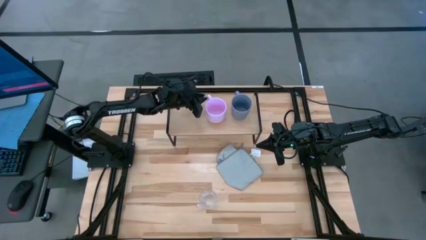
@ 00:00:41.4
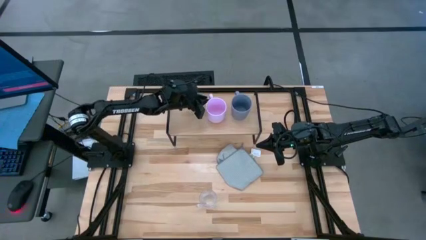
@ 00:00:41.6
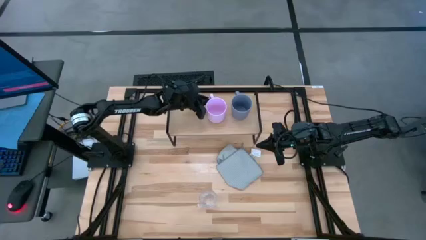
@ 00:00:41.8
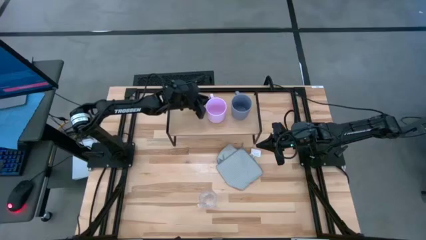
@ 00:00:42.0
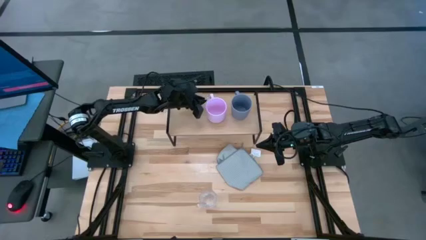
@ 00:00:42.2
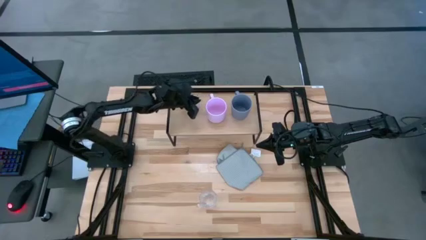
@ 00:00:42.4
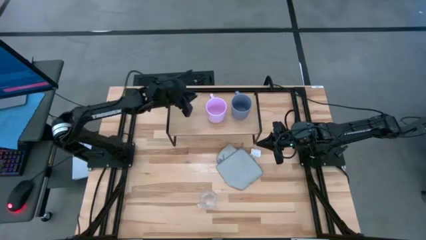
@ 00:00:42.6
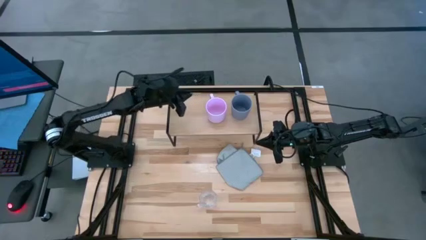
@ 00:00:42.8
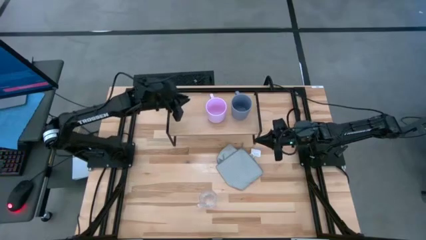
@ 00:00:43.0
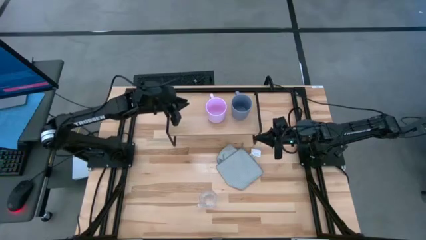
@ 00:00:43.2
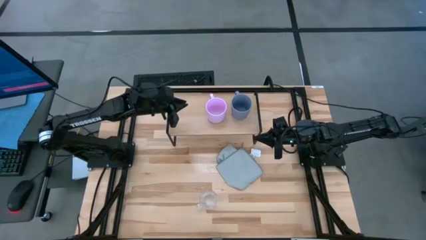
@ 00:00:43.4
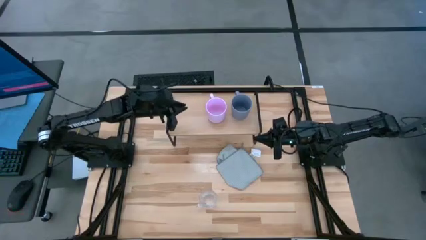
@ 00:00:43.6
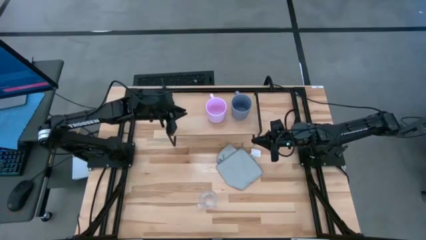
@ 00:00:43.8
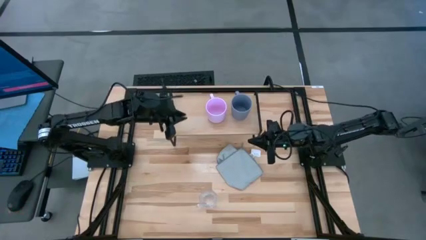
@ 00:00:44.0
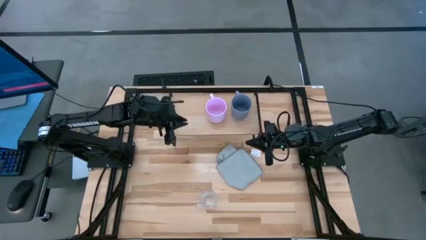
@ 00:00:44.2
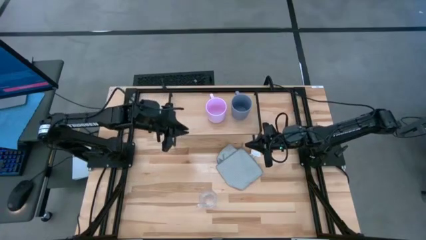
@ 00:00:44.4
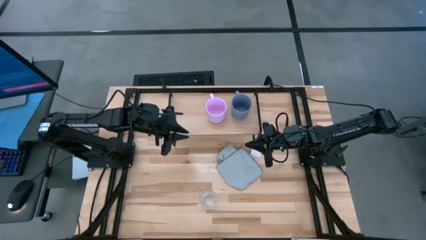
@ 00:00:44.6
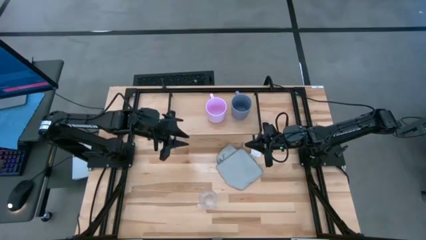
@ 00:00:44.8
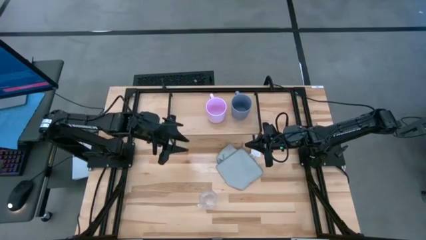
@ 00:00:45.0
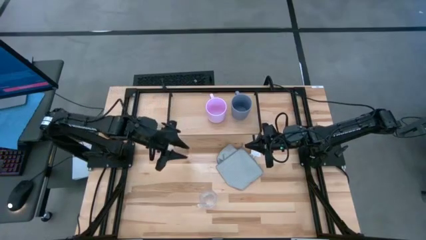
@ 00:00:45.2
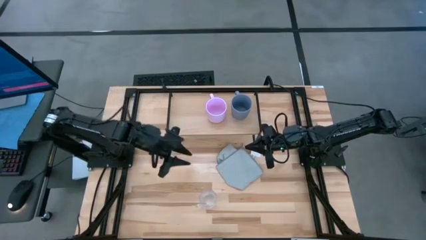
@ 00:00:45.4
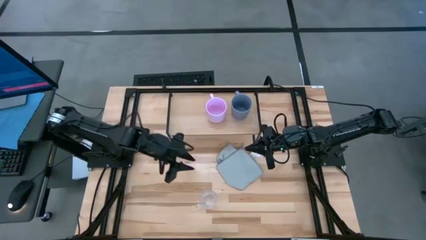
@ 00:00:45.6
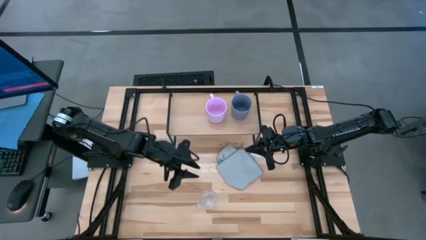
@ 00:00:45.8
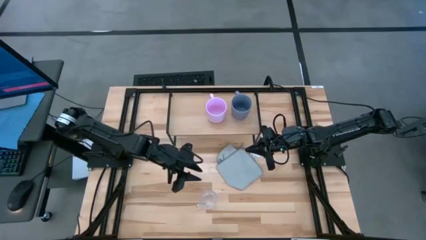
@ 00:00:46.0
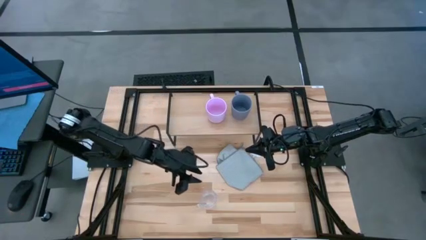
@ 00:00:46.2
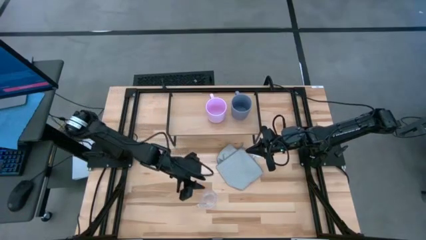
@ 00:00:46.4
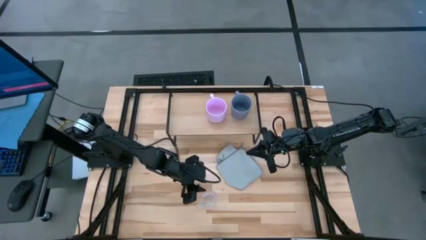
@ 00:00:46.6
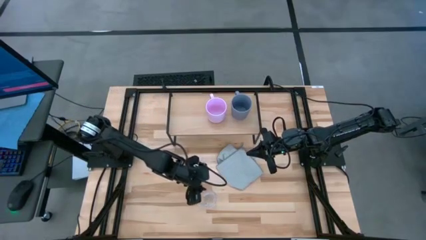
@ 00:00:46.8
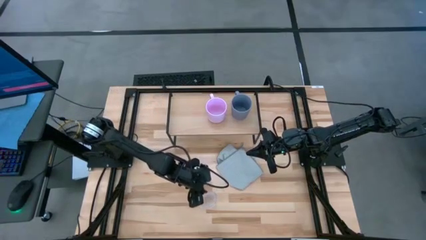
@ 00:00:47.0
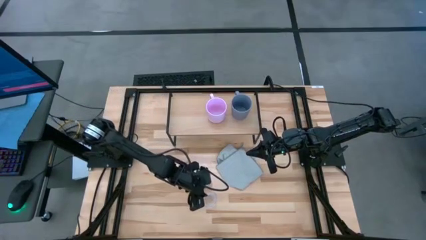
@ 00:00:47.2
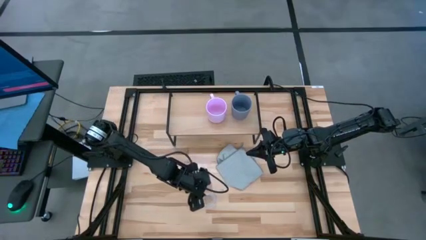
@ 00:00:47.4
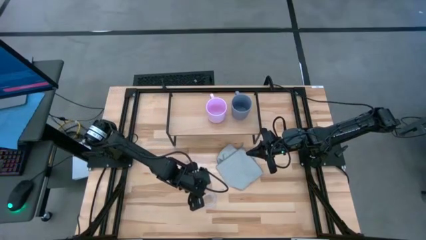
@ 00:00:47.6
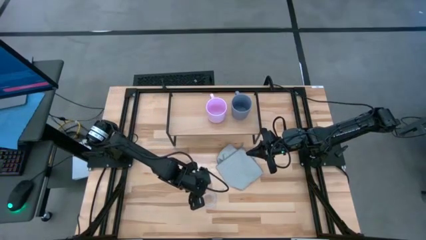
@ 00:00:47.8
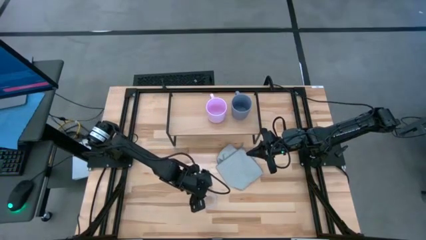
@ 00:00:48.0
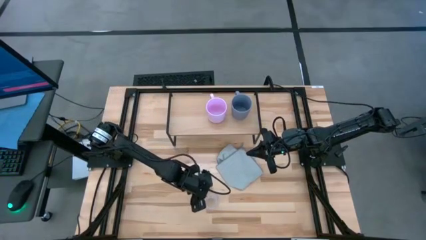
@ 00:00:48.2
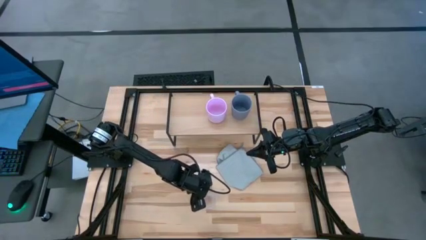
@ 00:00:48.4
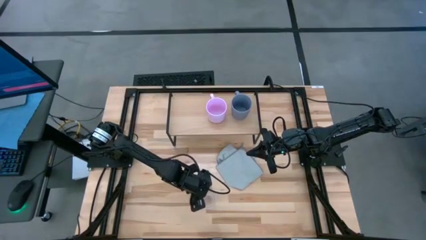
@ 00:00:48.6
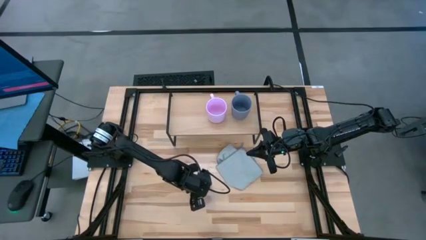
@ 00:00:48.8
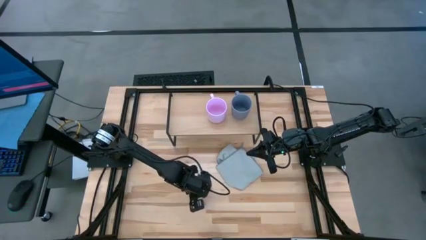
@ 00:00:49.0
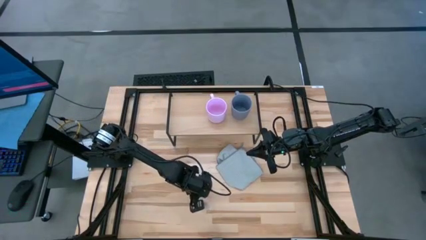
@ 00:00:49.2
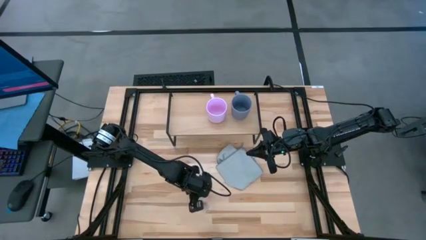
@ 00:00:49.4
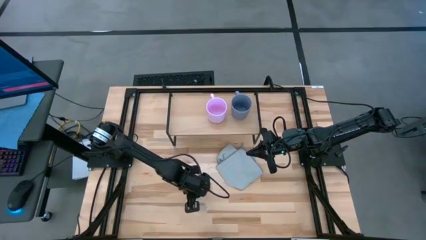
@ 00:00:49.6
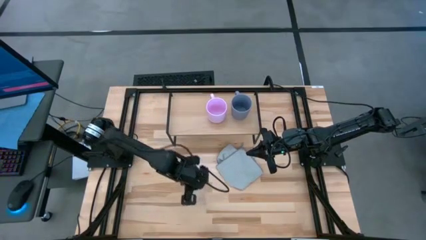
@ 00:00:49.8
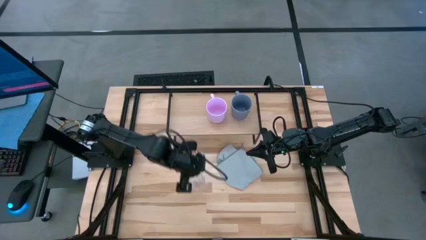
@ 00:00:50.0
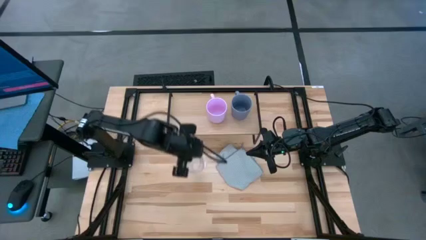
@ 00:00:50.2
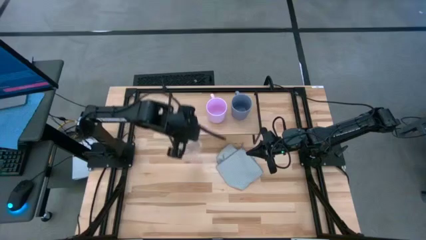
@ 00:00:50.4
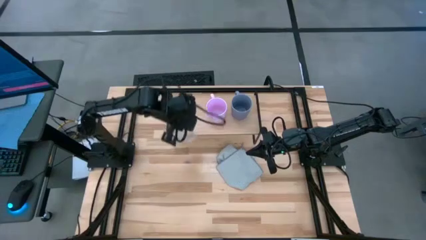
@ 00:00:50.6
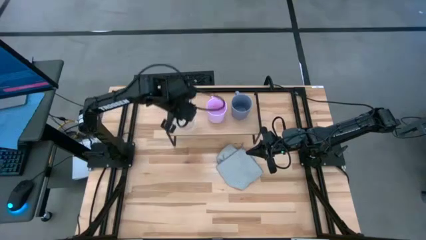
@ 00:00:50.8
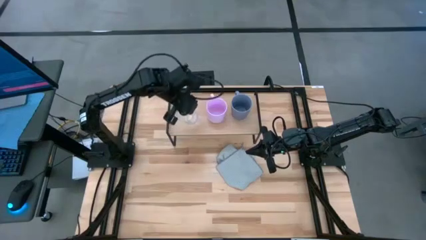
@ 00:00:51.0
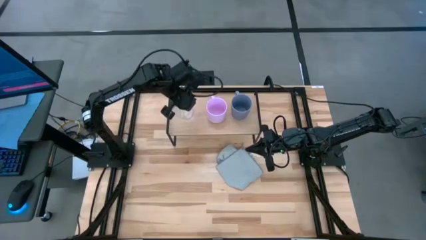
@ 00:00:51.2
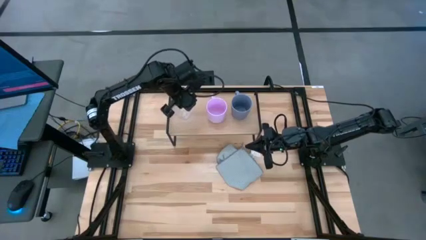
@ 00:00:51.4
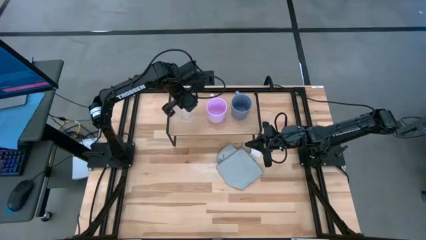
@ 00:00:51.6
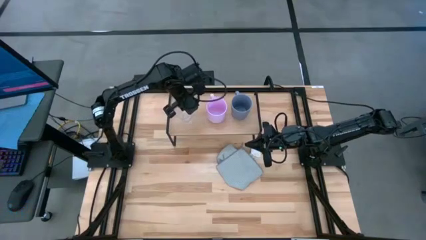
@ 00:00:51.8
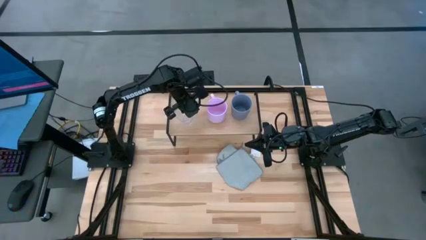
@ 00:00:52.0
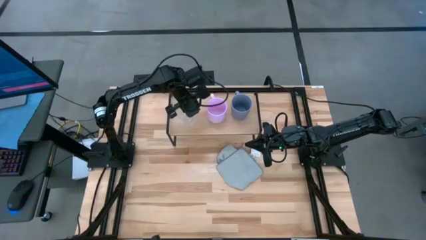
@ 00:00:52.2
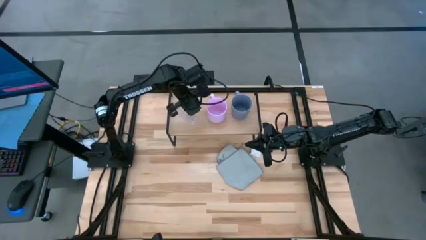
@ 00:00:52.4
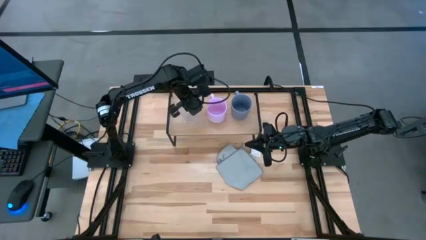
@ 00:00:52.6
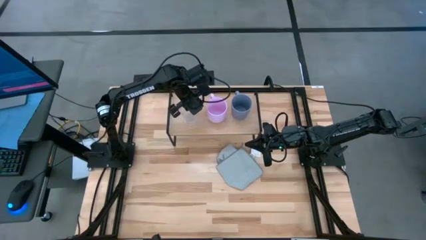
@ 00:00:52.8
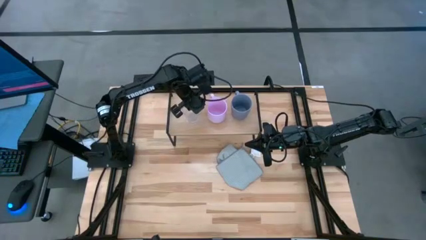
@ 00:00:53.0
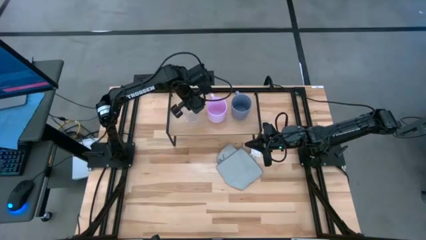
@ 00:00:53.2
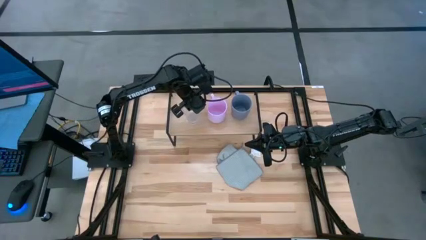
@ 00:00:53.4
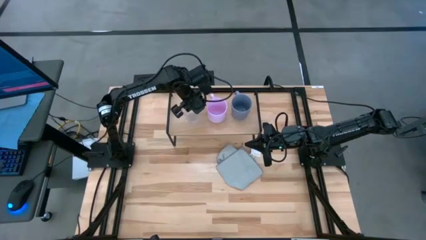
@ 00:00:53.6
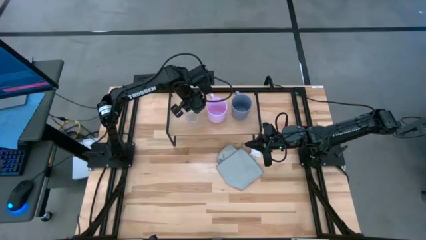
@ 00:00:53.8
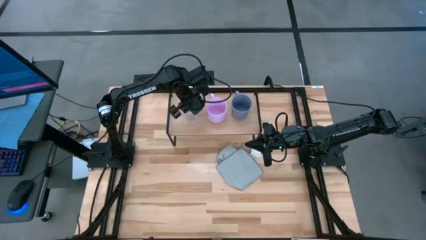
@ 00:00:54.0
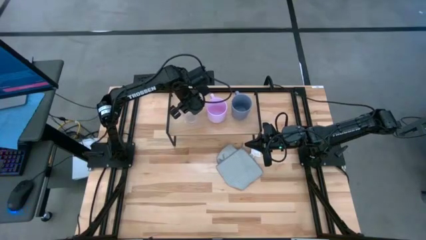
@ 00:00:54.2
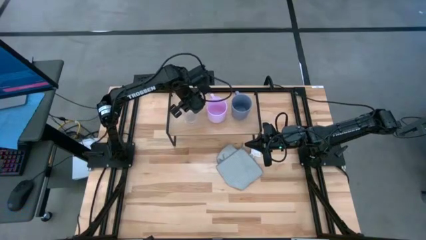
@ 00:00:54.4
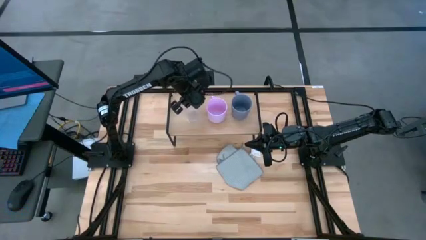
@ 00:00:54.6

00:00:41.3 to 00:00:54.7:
Task: Stack small to large cups/mugs on shelf
Put the transparent mug on the shelf
